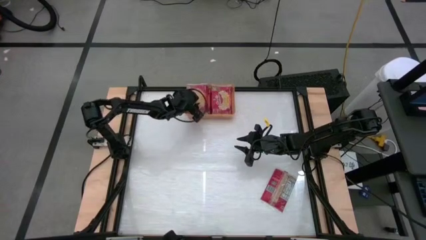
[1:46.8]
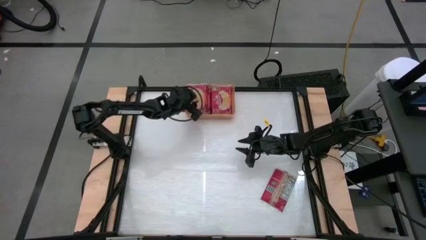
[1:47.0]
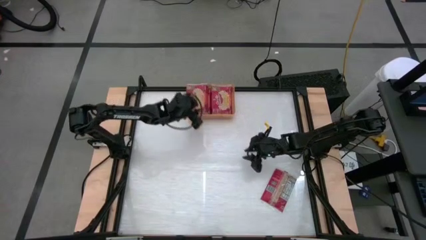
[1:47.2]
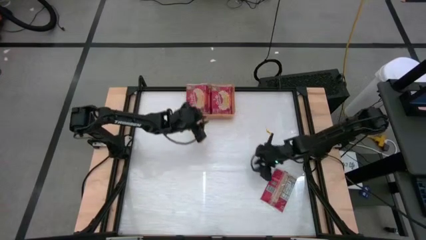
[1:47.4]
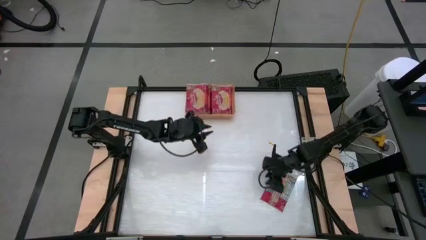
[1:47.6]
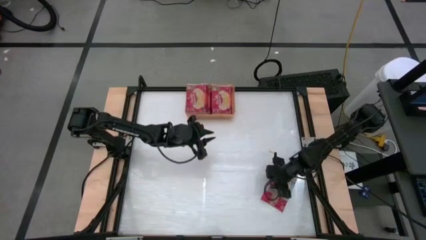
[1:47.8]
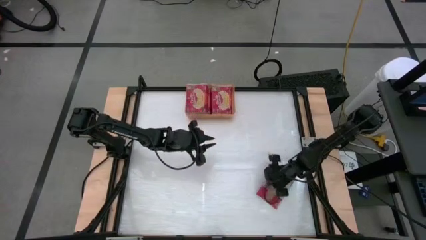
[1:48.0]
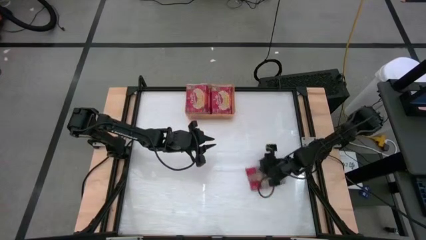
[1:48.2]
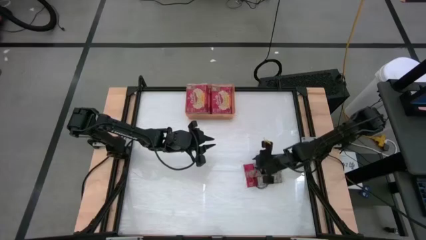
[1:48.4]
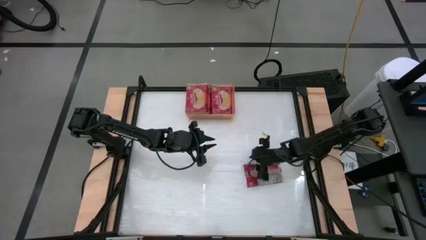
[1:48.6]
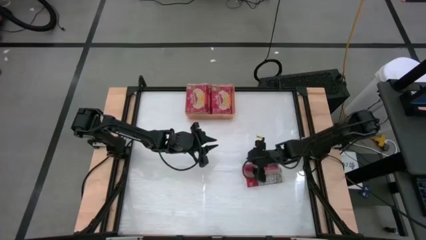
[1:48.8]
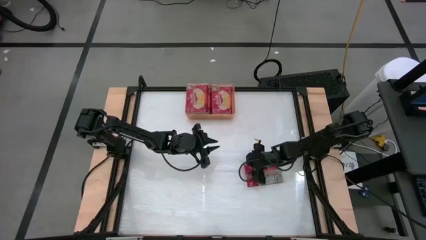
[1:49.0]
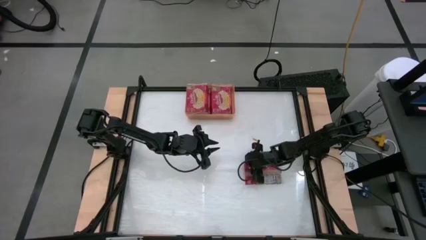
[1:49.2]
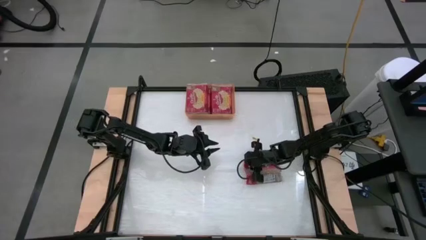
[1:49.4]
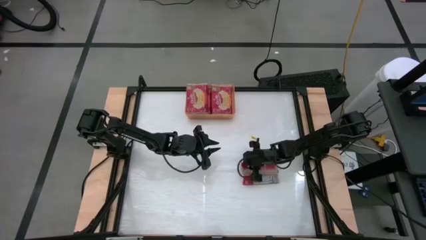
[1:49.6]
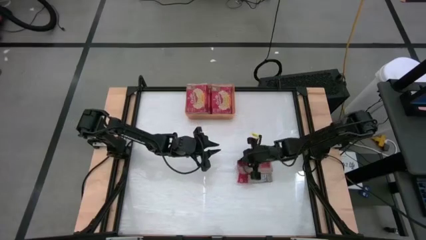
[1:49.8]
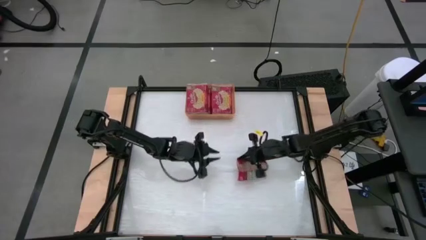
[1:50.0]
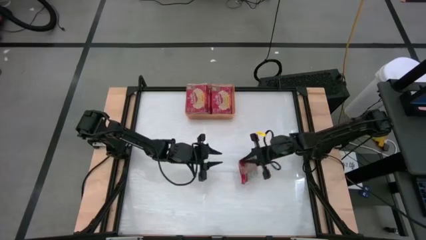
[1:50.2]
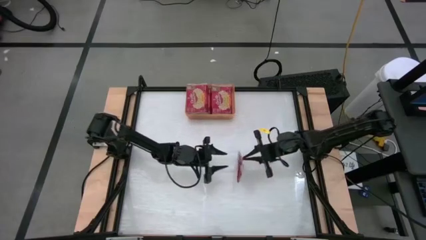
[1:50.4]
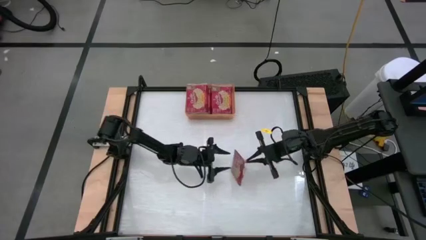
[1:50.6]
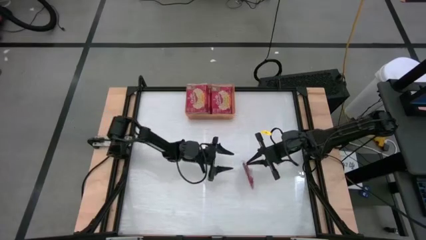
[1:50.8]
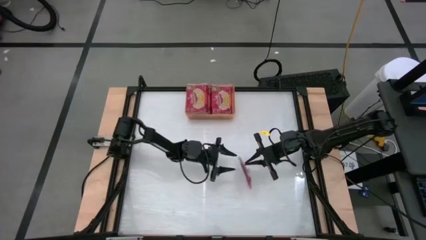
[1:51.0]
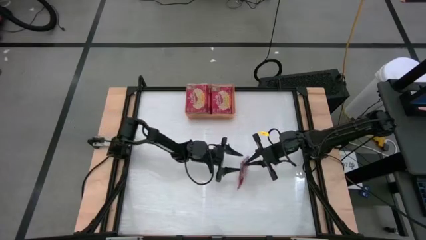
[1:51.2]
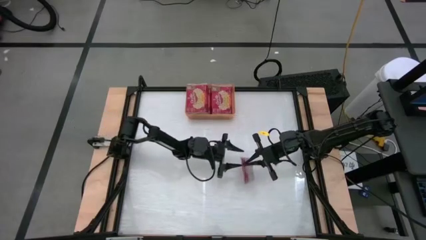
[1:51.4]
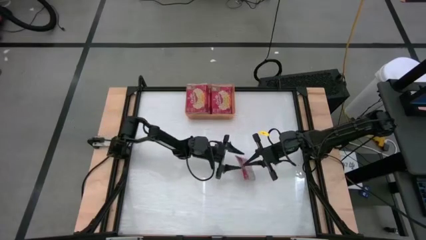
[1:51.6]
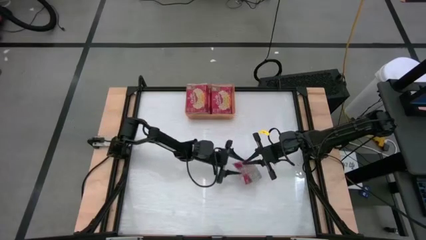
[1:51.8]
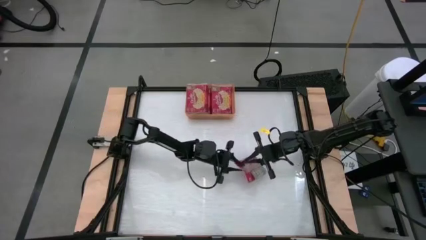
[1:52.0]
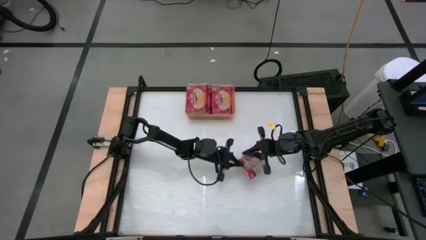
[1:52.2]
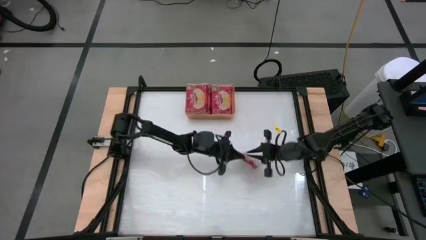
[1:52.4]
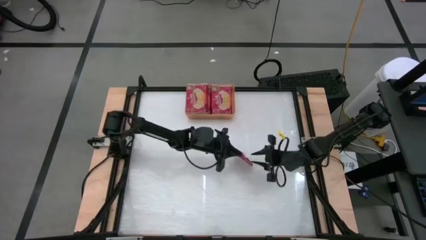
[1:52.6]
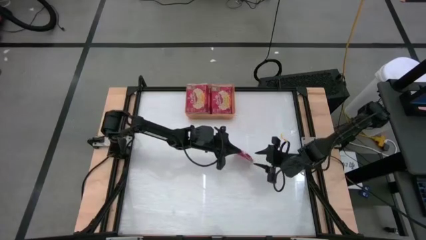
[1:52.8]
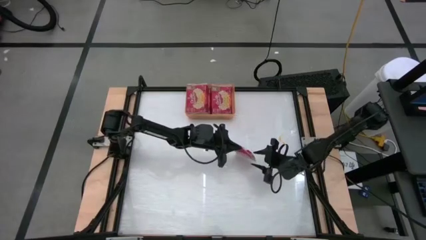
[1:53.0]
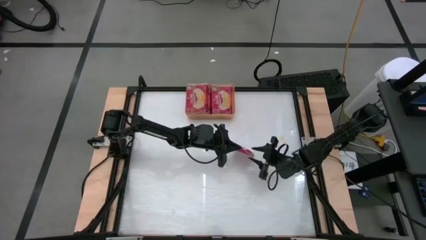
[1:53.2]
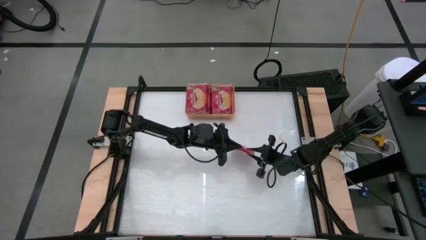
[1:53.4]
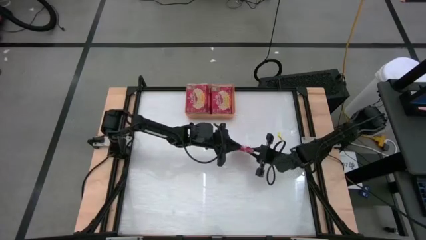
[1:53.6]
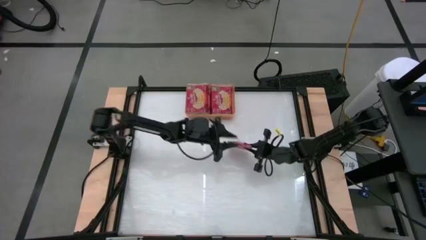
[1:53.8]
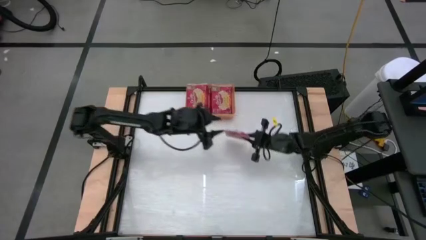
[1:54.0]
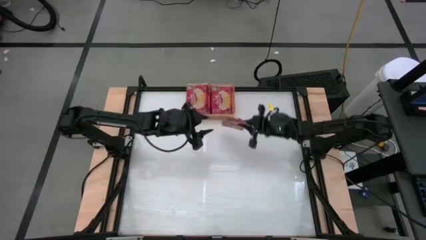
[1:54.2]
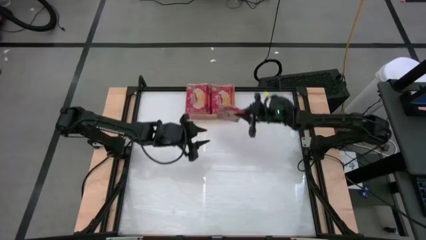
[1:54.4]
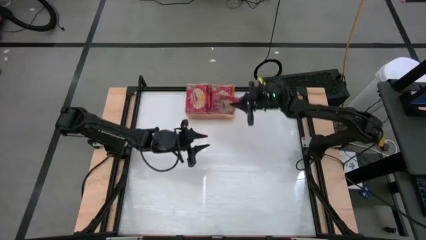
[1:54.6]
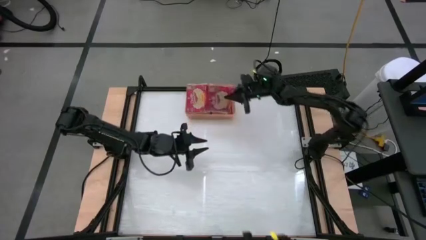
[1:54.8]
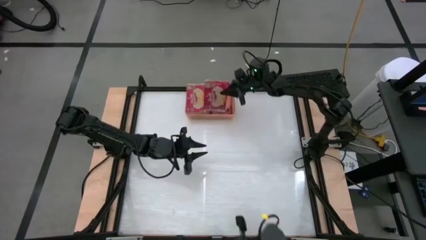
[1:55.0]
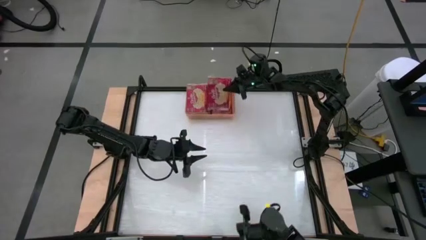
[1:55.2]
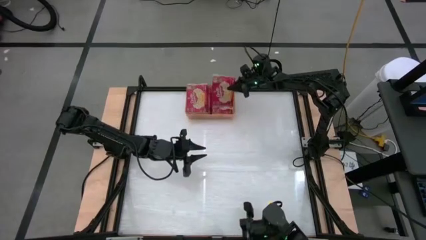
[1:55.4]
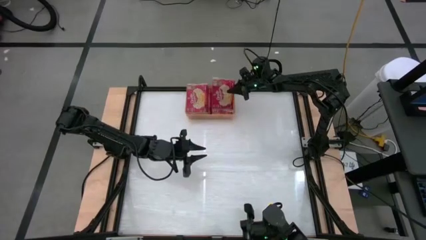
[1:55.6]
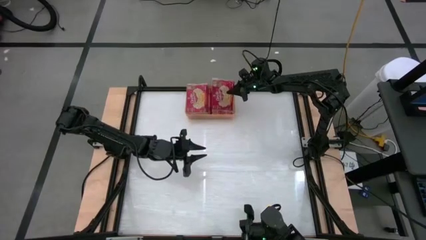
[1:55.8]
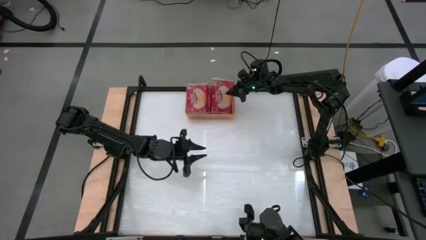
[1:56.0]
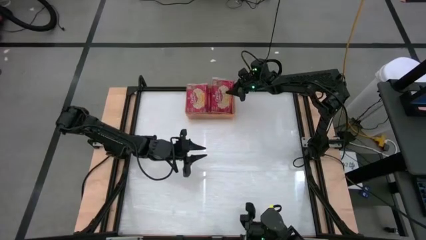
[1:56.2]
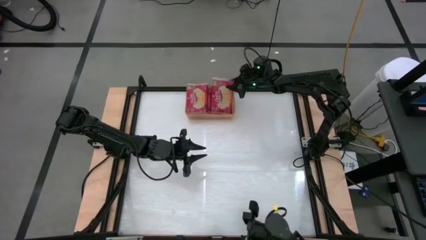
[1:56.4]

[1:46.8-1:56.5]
Task: Sort popcorn bags into baskets
Put the red popcorn bag into the orange bin

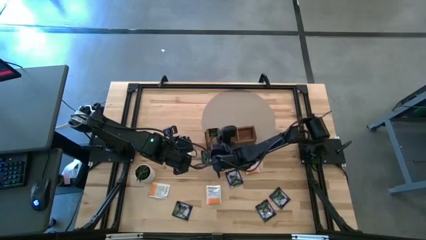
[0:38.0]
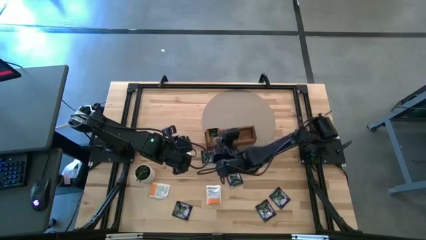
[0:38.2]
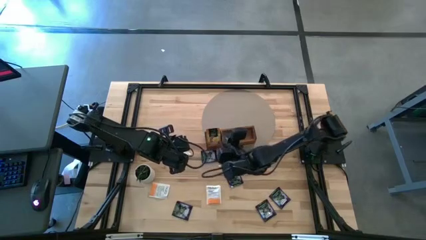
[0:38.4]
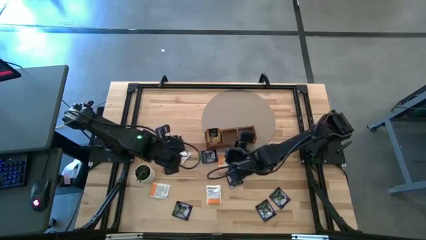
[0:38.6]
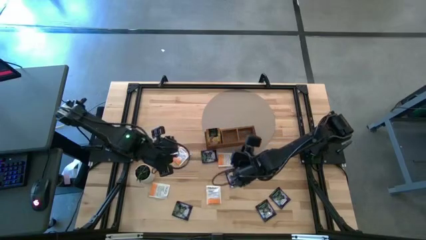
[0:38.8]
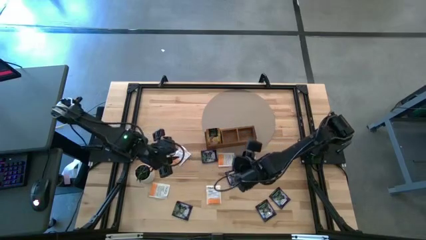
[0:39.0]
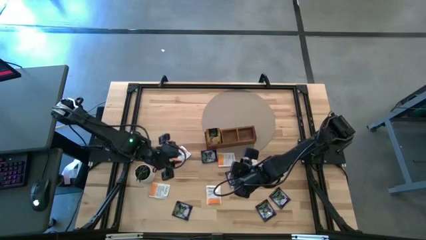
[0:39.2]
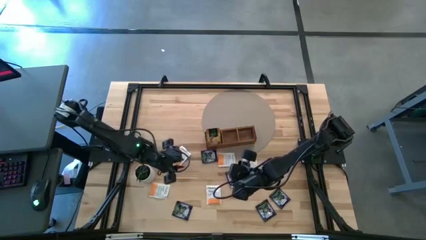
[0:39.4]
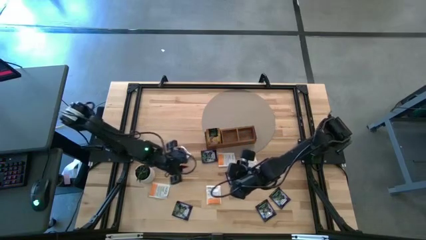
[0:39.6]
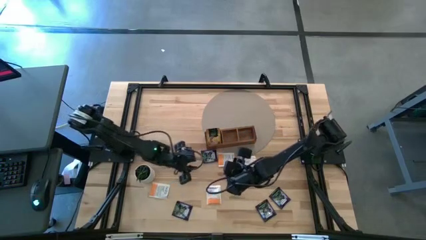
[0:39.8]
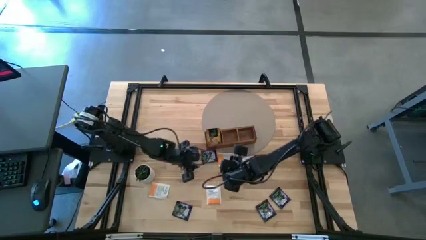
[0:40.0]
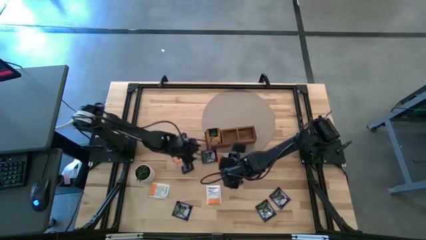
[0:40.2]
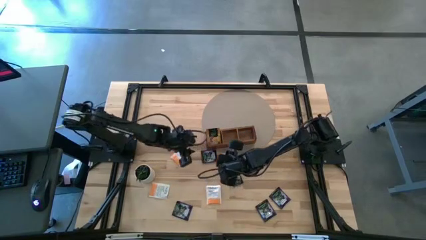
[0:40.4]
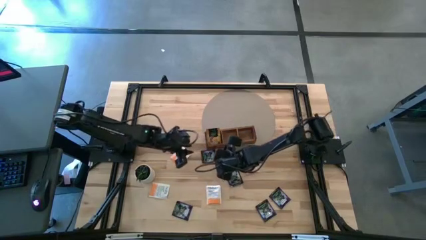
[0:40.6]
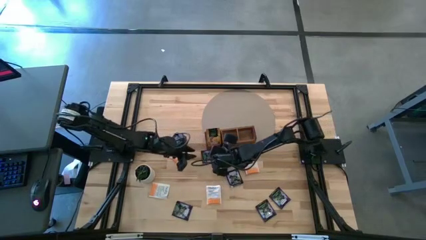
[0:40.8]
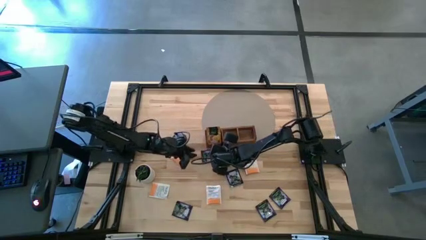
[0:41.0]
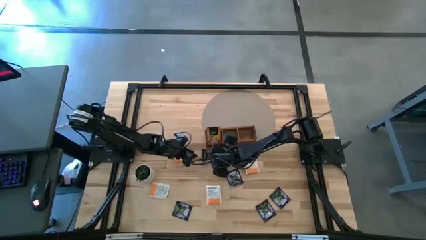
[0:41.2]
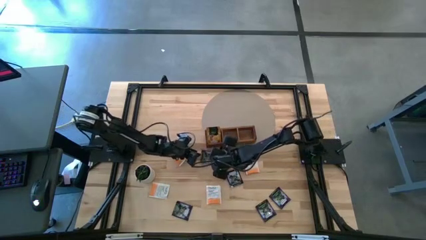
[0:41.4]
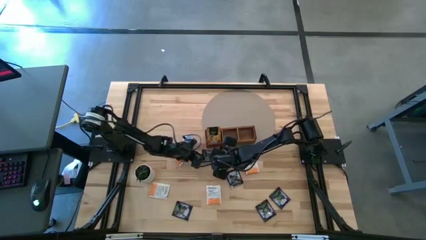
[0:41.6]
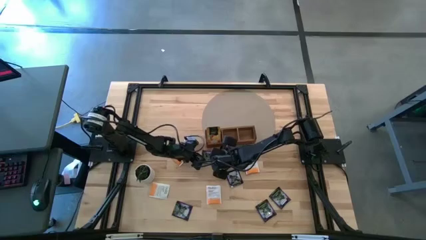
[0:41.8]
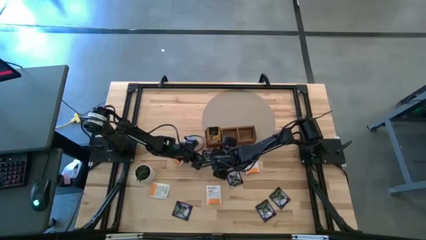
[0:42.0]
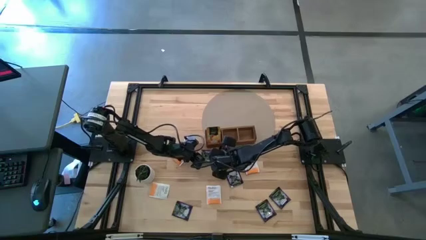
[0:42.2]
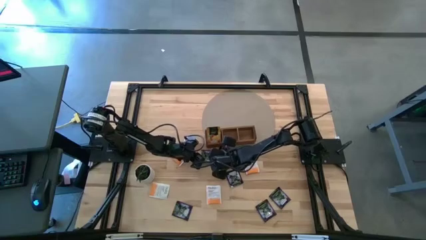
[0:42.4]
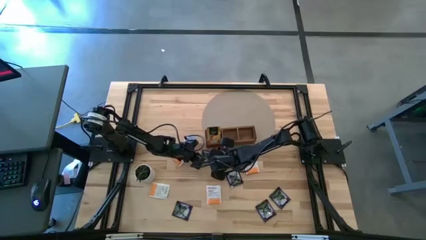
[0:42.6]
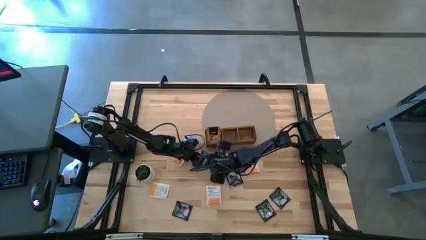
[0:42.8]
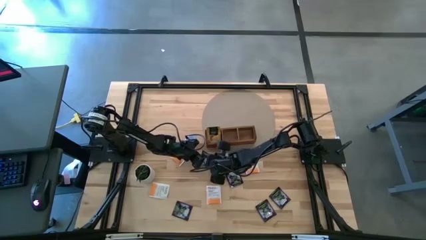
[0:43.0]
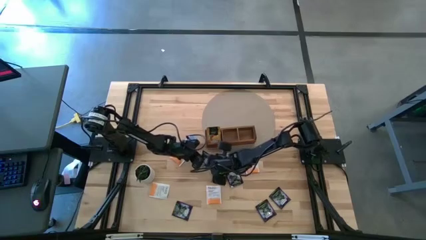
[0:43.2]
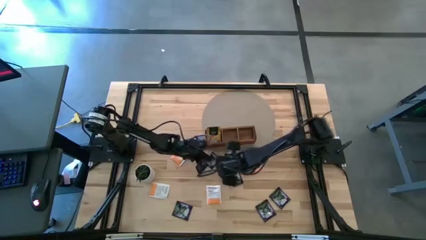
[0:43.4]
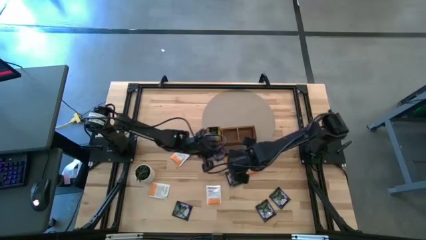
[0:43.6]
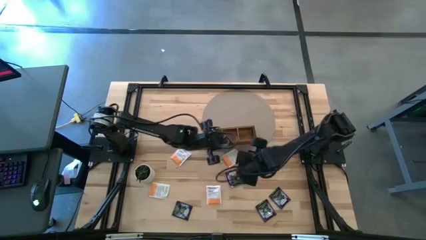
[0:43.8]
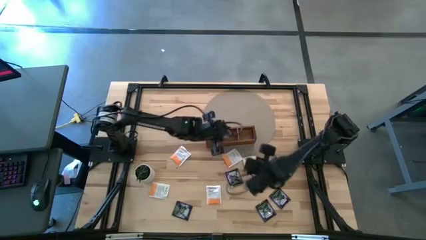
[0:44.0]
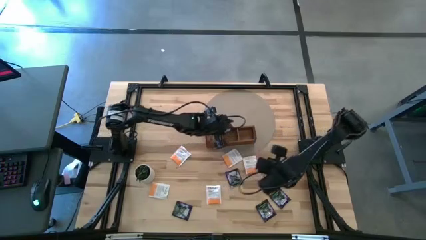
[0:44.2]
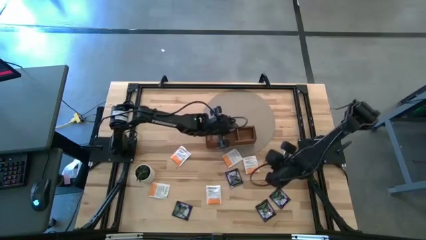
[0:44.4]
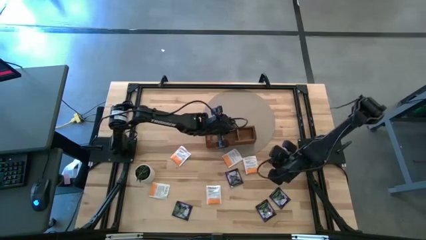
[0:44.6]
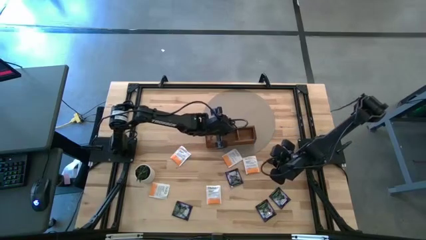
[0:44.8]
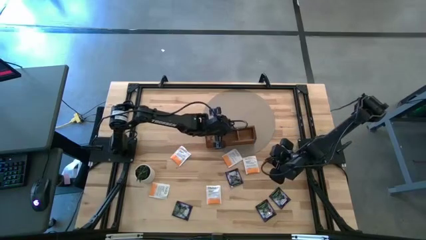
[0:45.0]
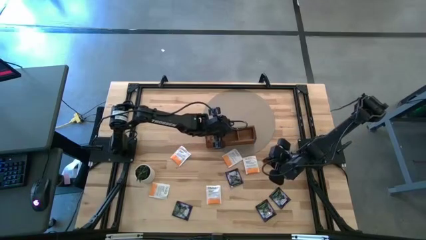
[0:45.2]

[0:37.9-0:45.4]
Task: Pick & Place Tea
Put the violet tea bag into the middle section of the wooden organizer
